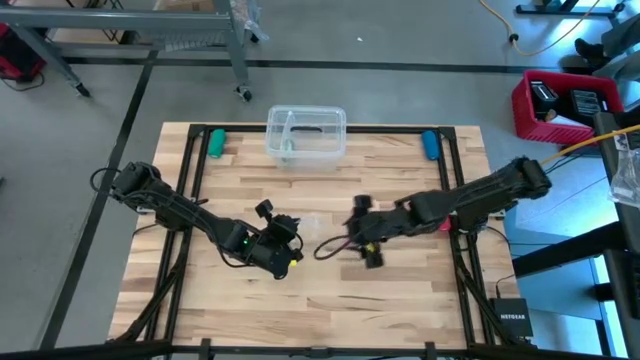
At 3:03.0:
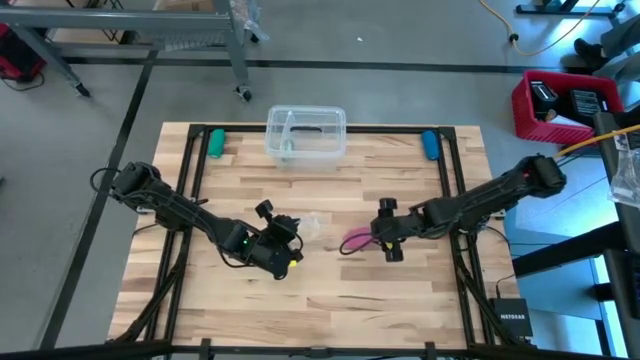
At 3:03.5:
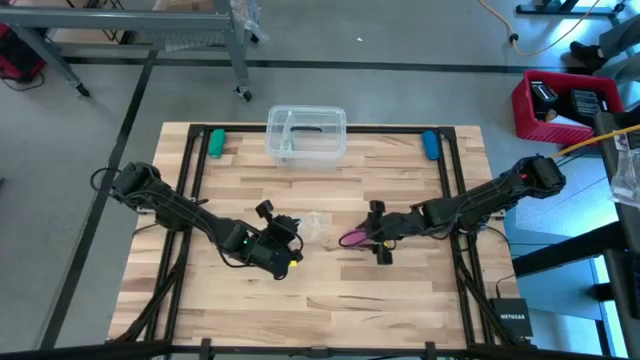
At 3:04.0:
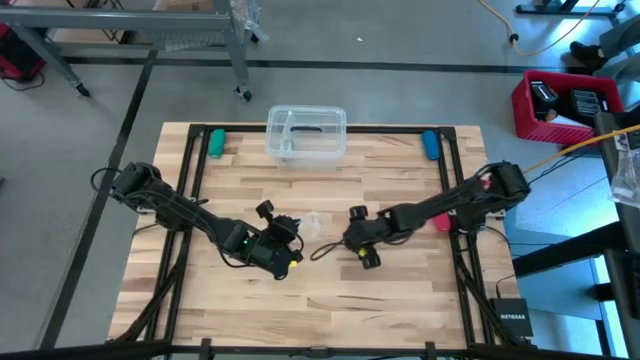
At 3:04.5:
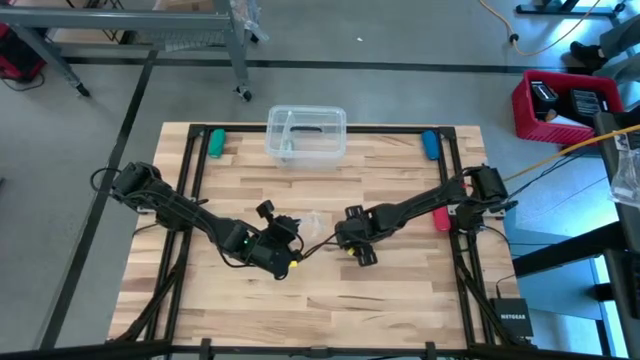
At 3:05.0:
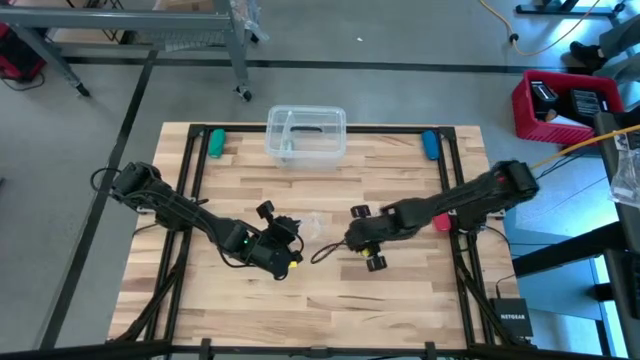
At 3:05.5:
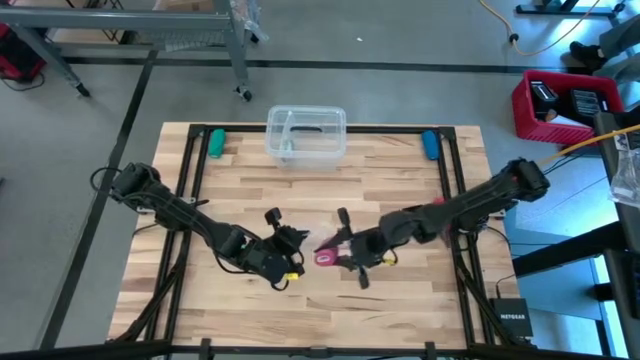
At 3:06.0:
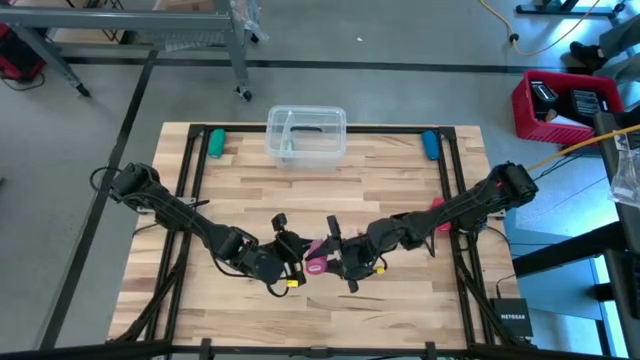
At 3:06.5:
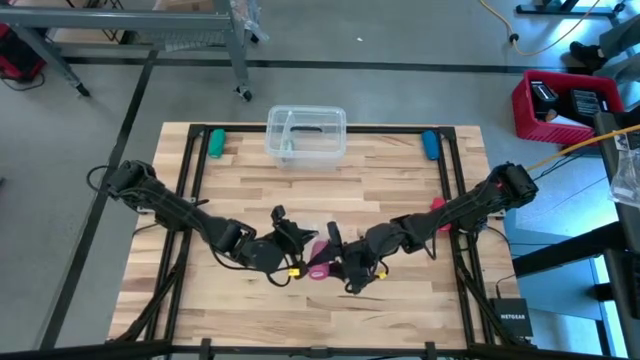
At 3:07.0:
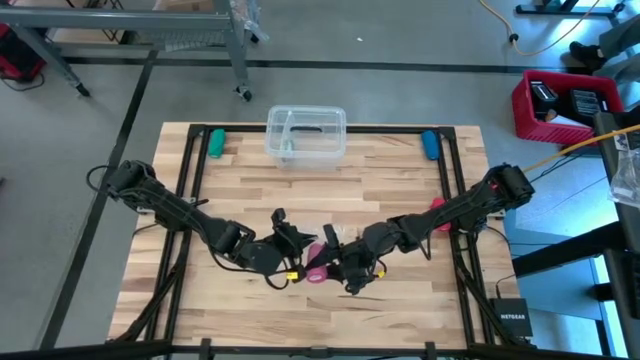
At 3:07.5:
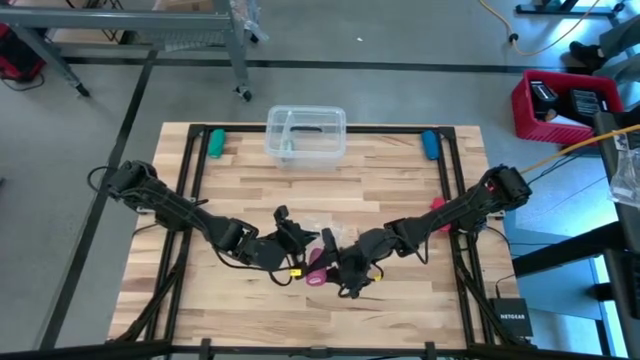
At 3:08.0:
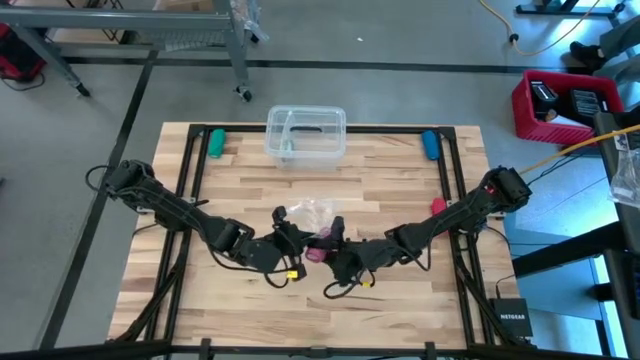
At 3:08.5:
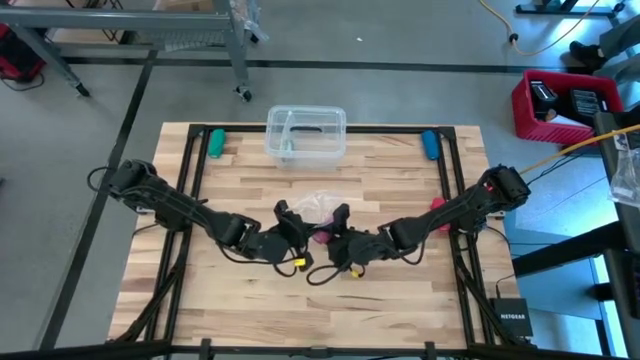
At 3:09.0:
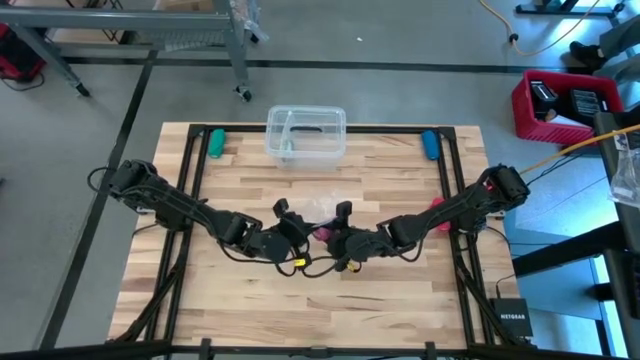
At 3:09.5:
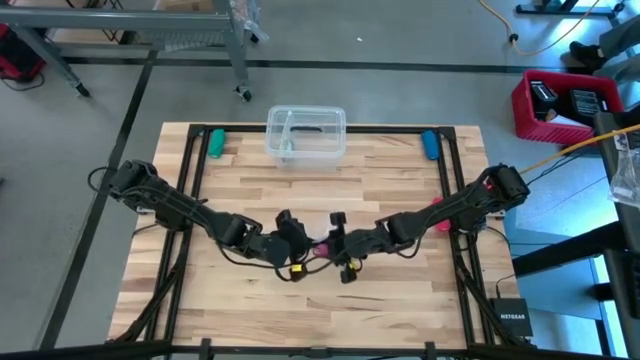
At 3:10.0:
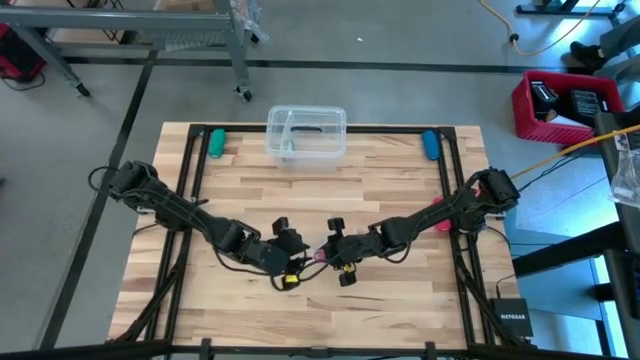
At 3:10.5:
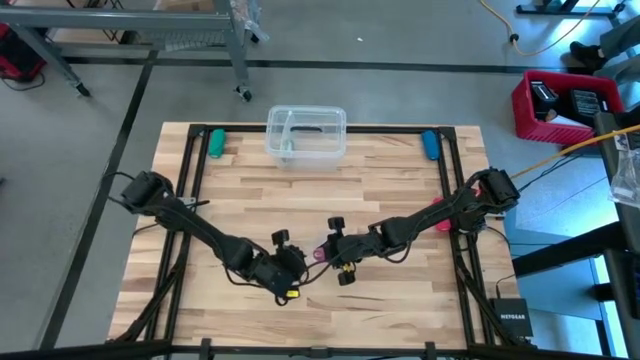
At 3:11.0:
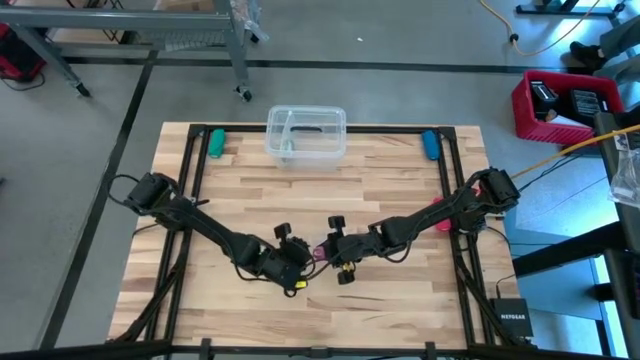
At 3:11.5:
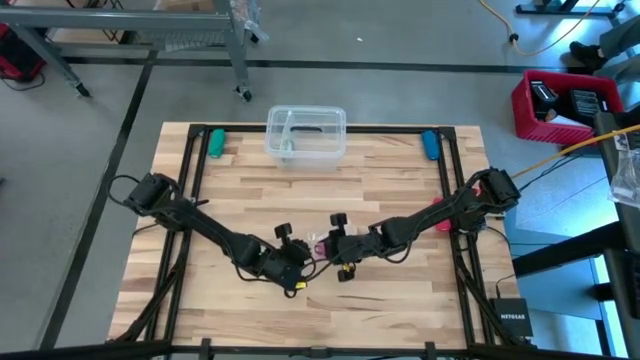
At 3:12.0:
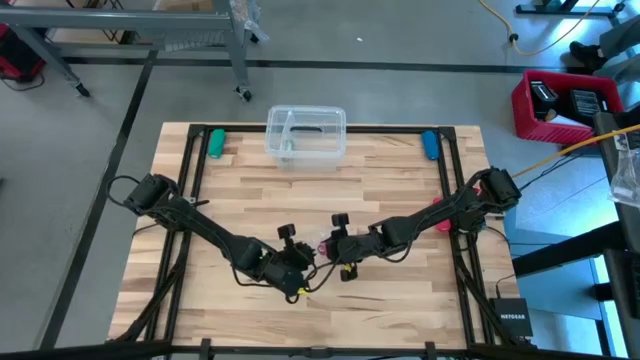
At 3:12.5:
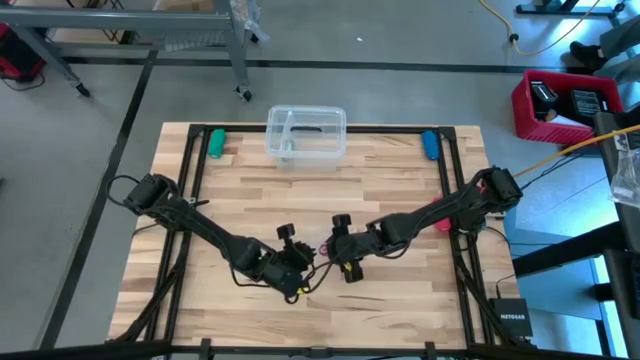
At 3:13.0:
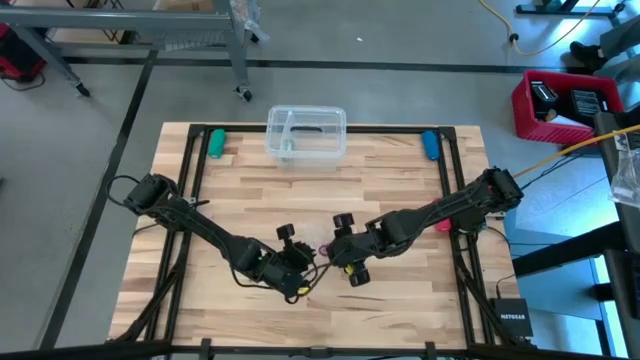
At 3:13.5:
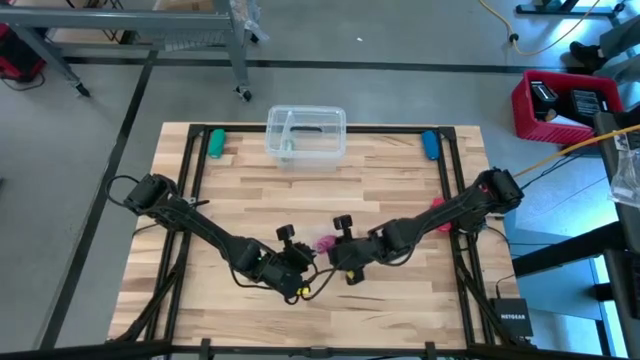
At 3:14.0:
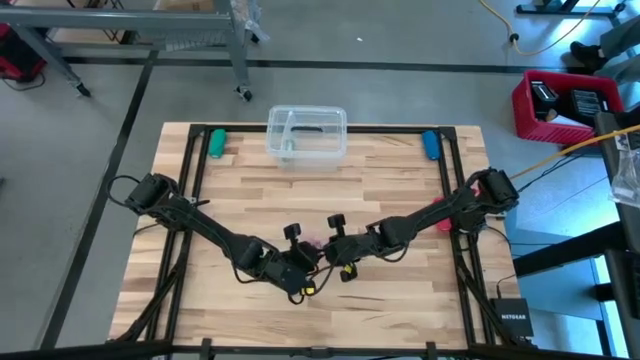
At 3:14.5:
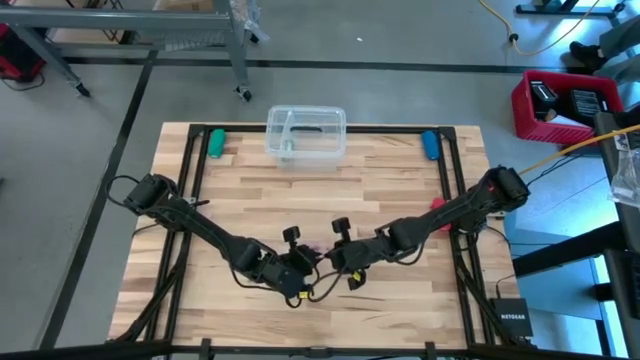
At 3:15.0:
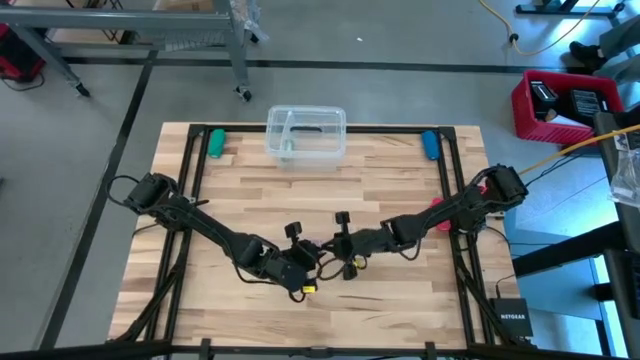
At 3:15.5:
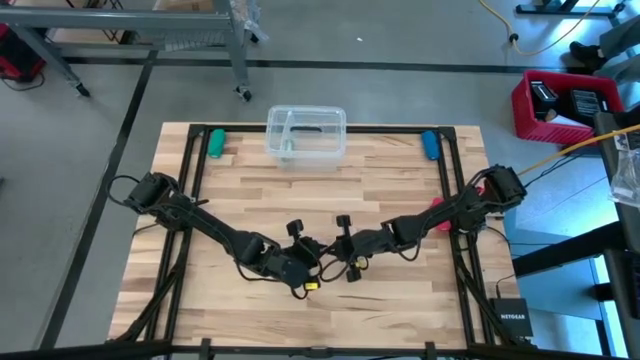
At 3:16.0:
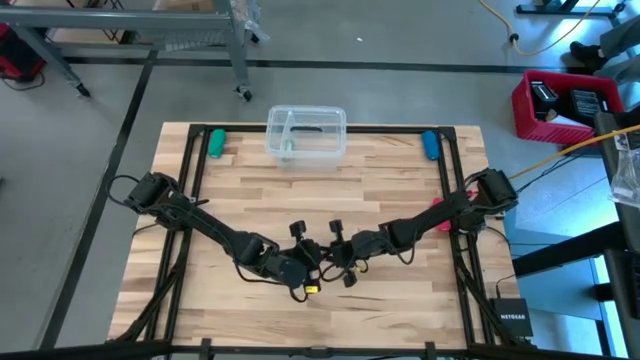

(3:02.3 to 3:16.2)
Task: Roll bandage
Put the rolled pink bandage into the transparent zip bag

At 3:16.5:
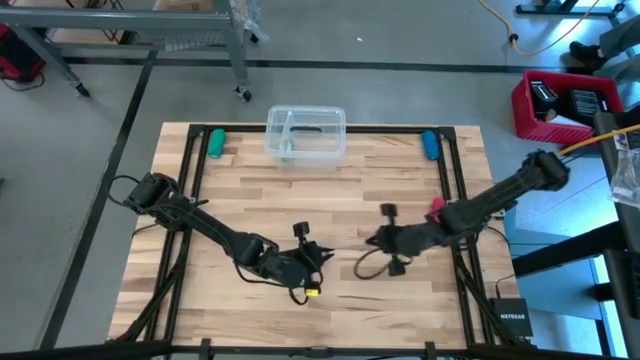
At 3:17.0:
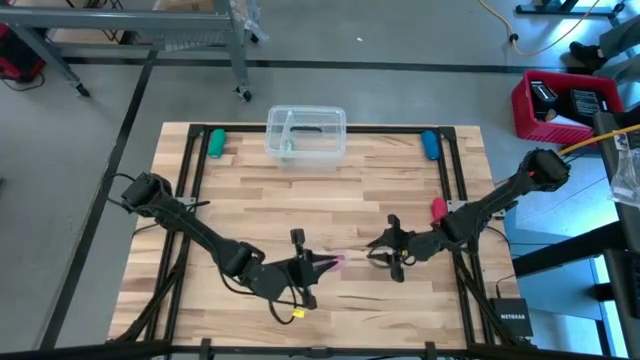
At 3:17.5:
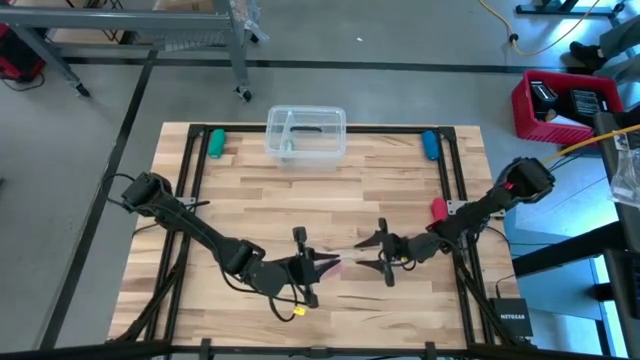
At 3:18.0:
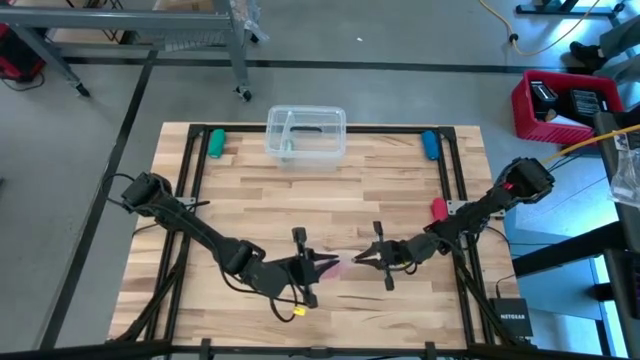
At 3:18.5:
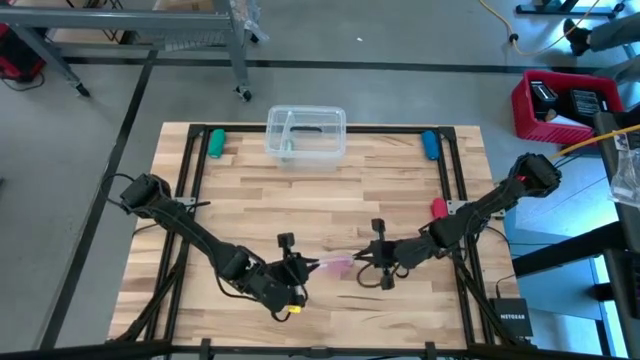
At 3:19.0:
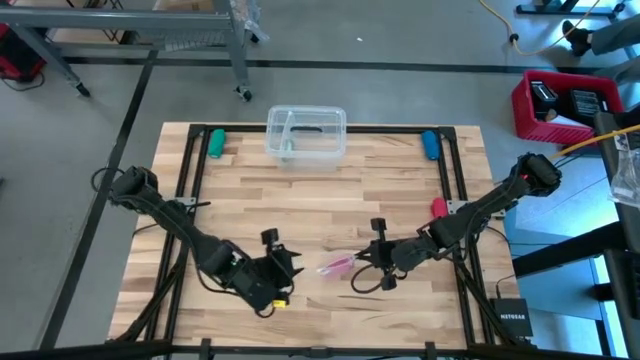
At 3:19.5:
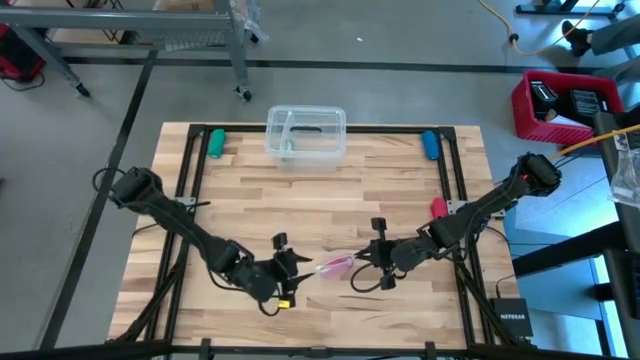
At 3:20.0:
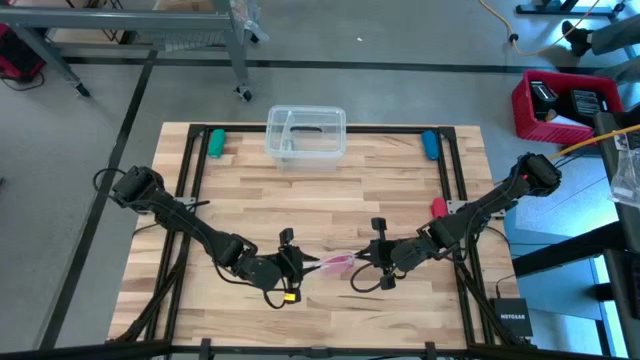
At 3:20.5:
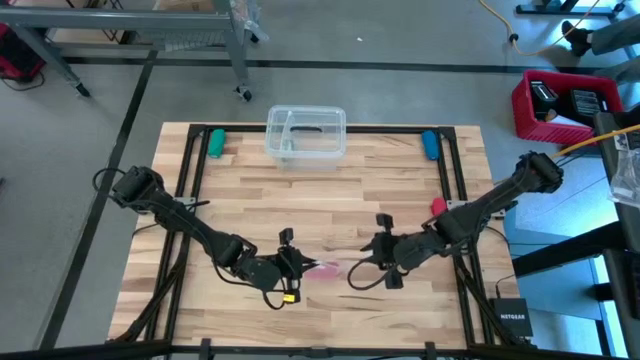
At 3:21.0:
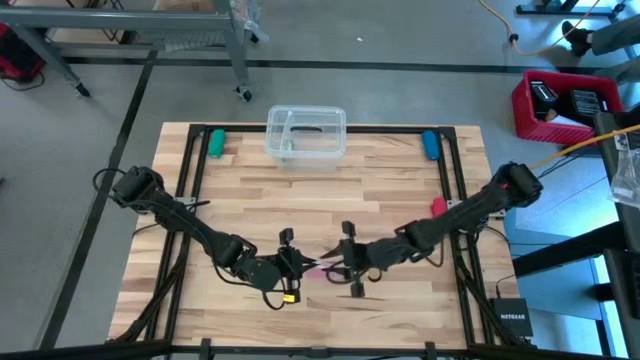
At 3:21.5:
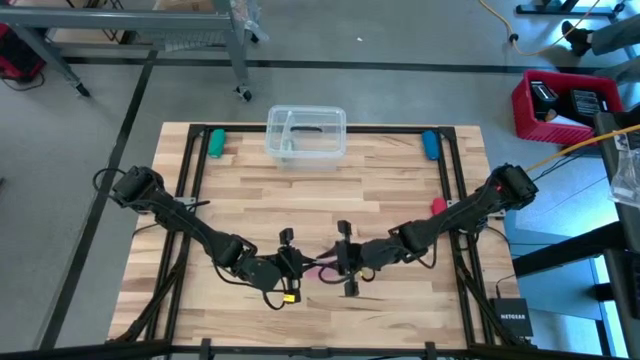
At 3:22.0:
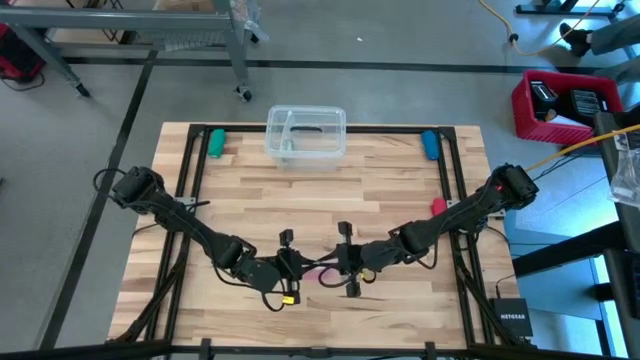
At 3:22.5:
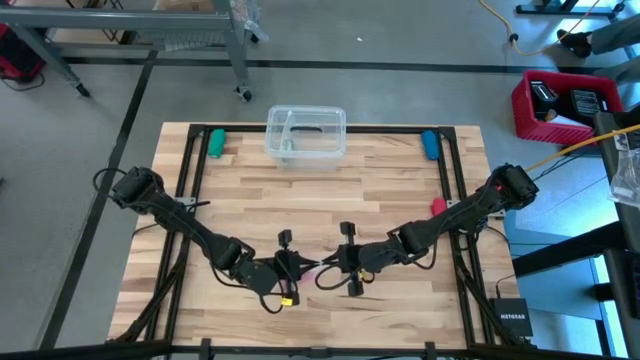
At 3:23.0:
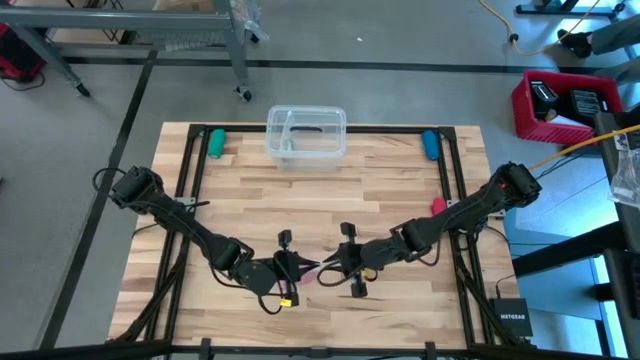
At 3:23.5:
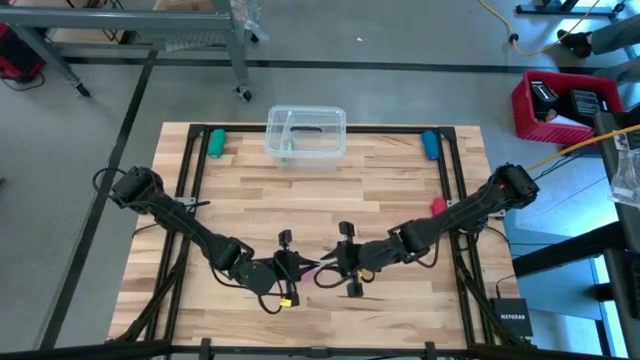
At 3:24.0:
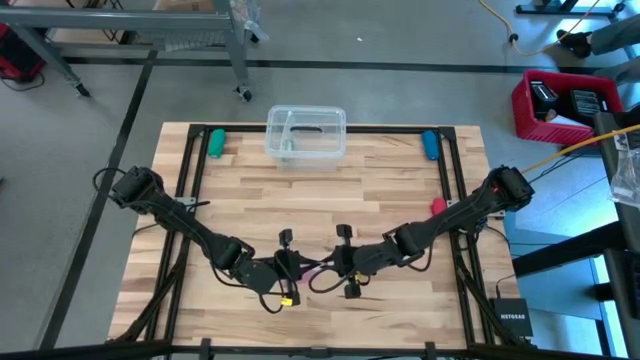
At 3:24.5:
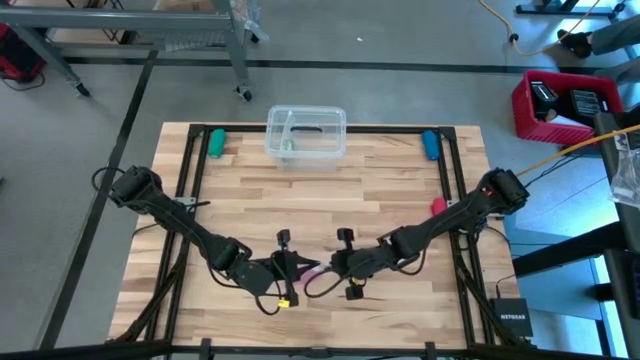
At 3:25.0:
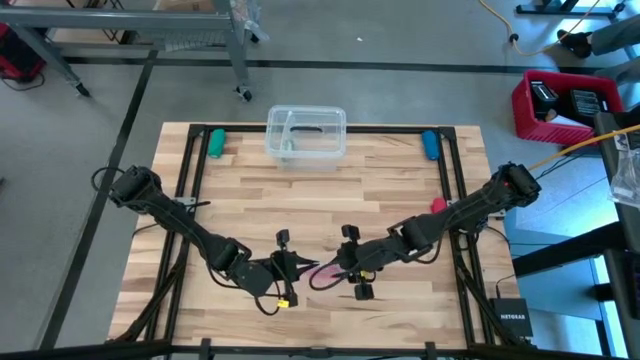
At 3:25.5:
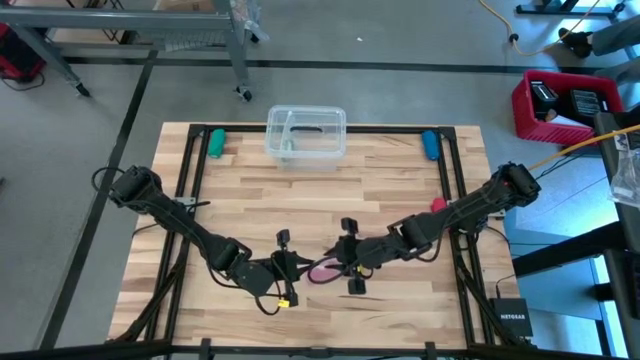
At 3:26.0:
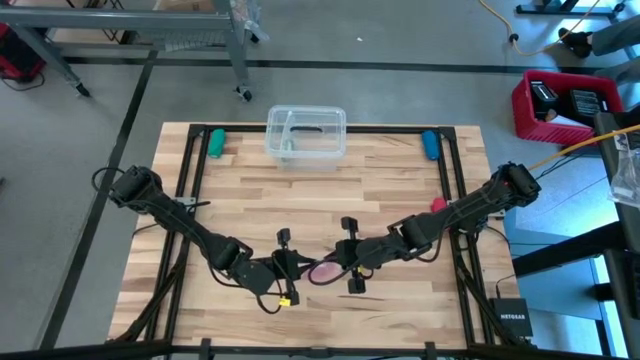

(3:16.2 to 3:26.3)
Close the transparent zip bag
